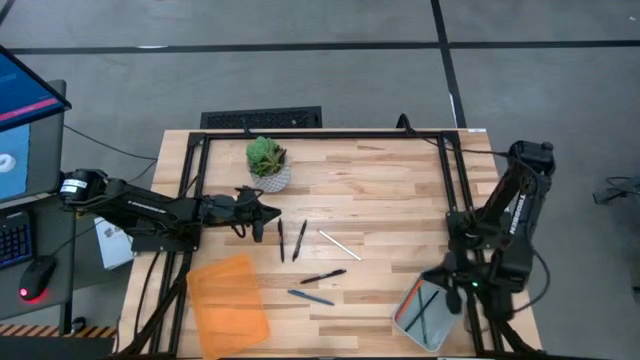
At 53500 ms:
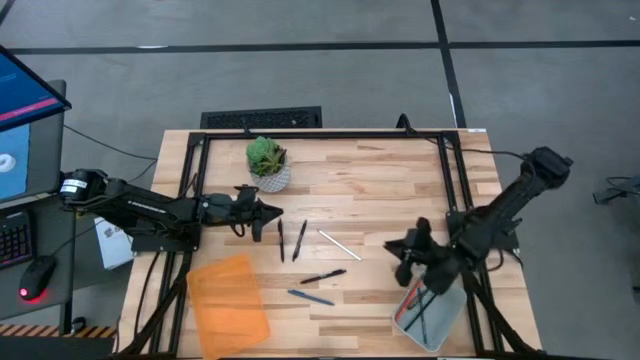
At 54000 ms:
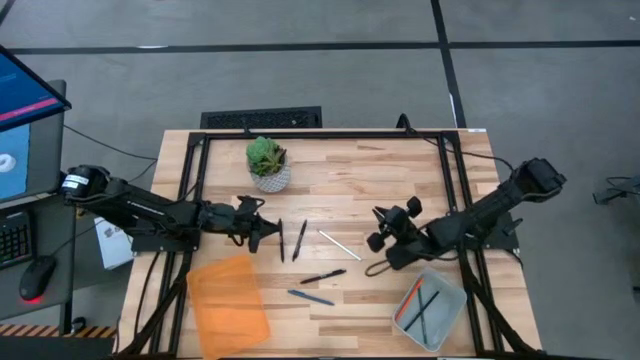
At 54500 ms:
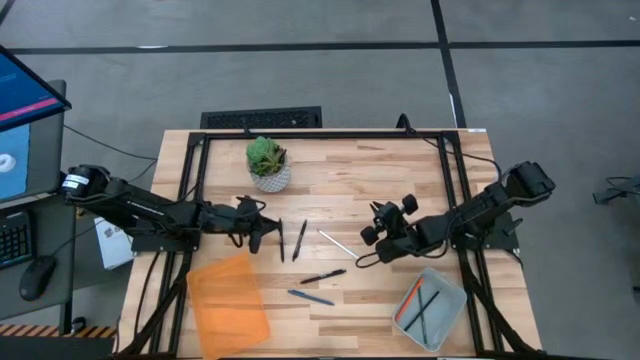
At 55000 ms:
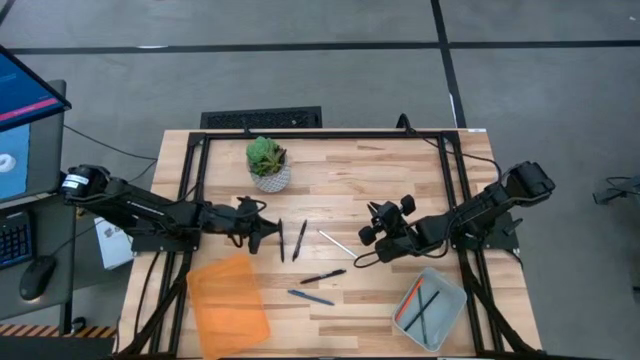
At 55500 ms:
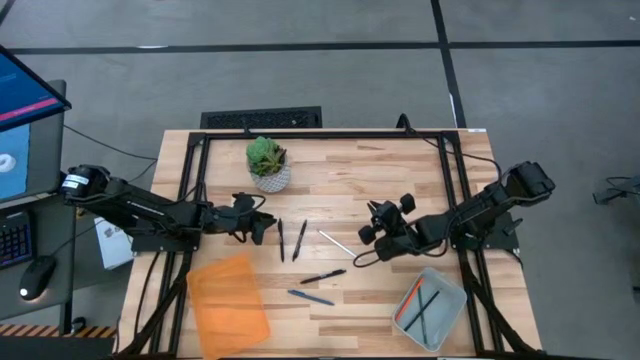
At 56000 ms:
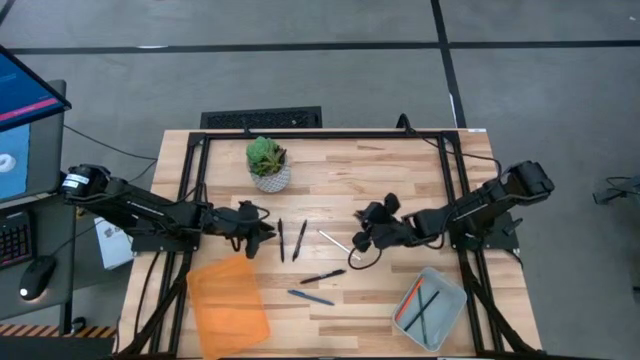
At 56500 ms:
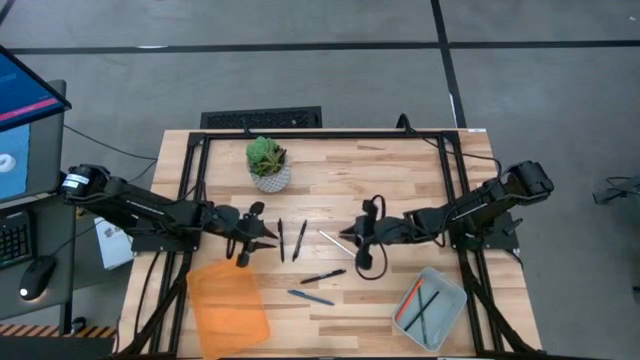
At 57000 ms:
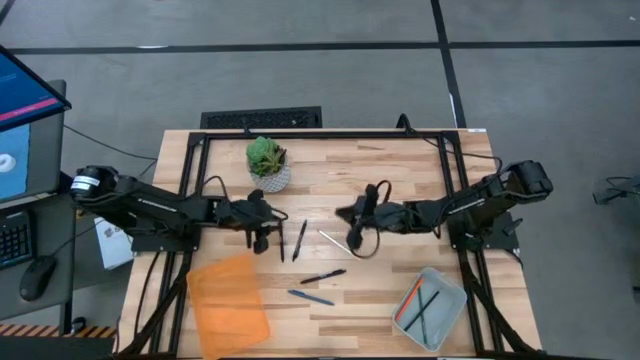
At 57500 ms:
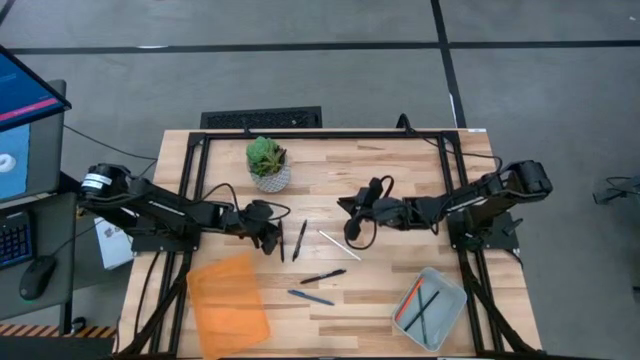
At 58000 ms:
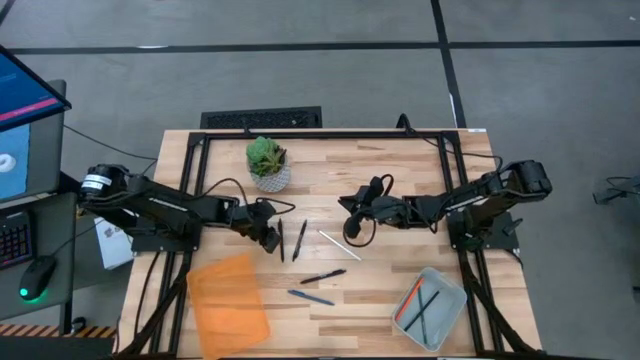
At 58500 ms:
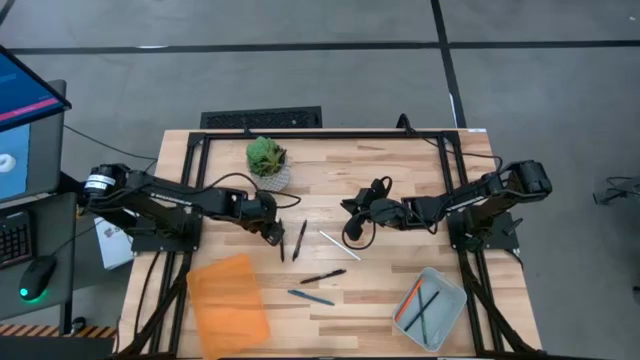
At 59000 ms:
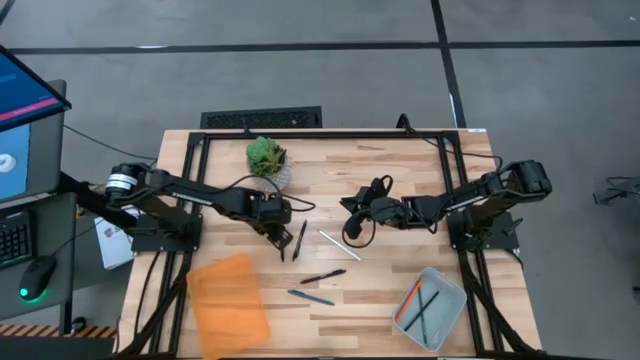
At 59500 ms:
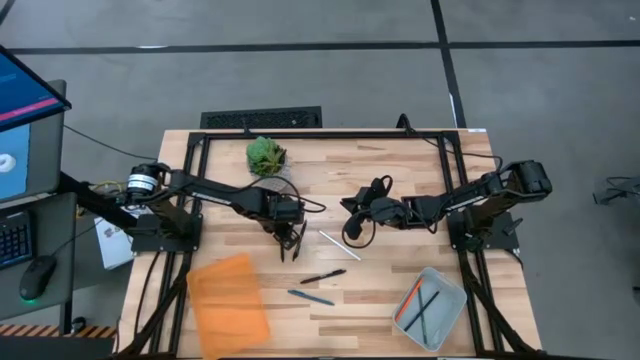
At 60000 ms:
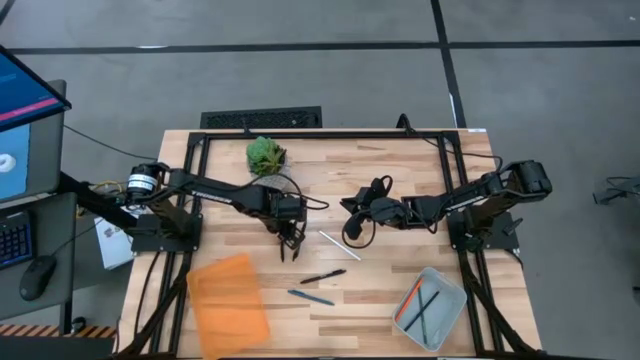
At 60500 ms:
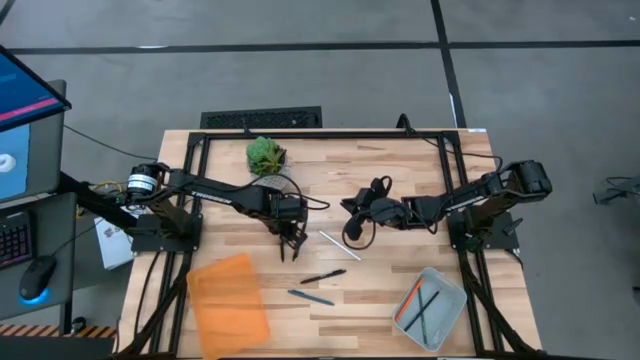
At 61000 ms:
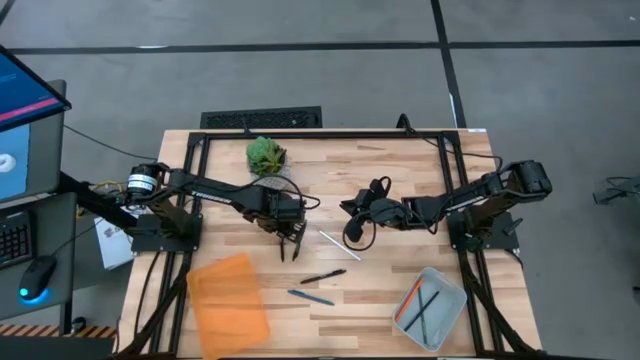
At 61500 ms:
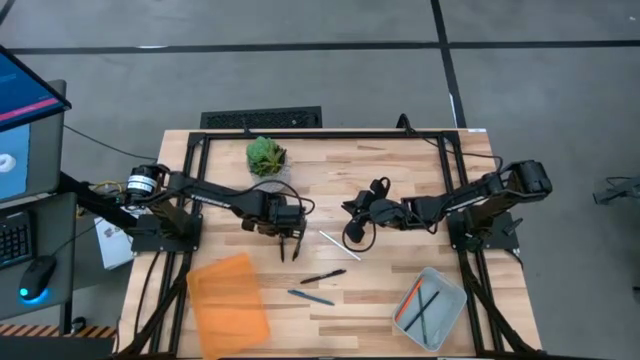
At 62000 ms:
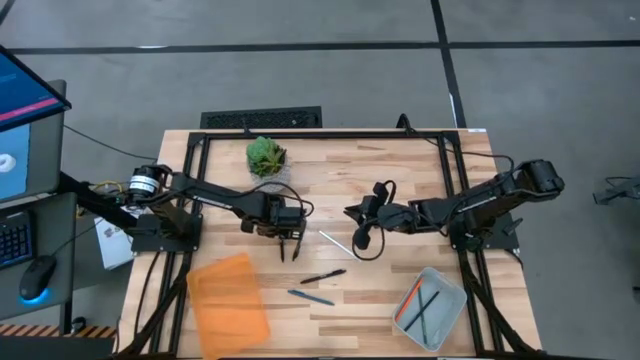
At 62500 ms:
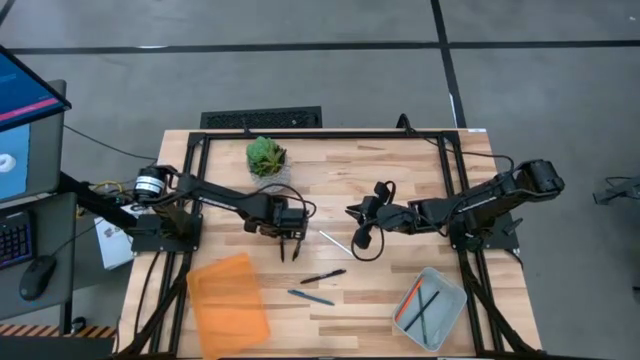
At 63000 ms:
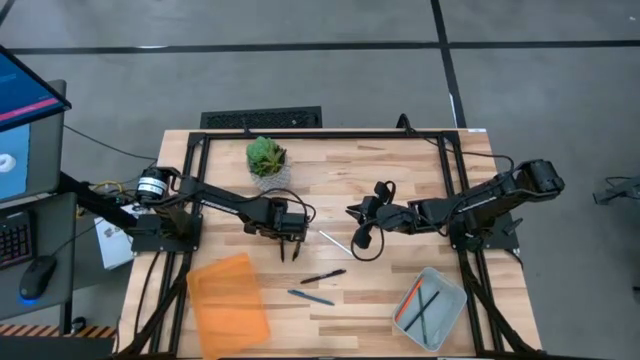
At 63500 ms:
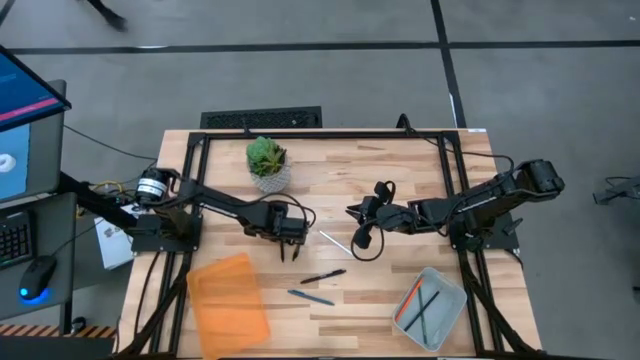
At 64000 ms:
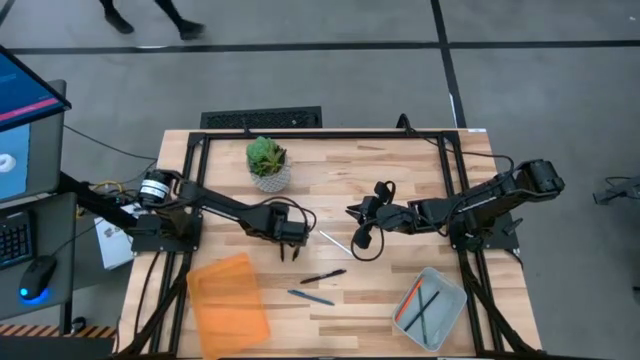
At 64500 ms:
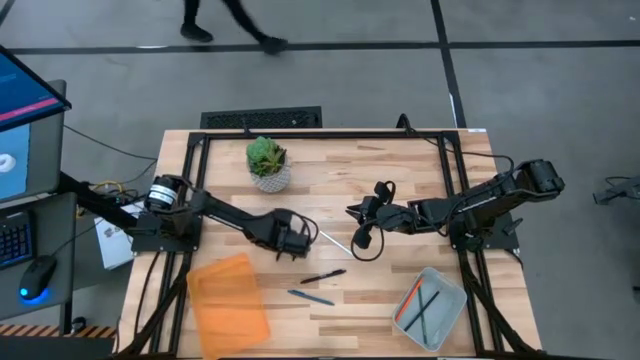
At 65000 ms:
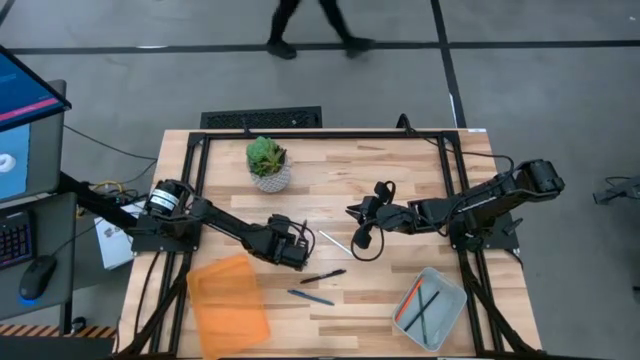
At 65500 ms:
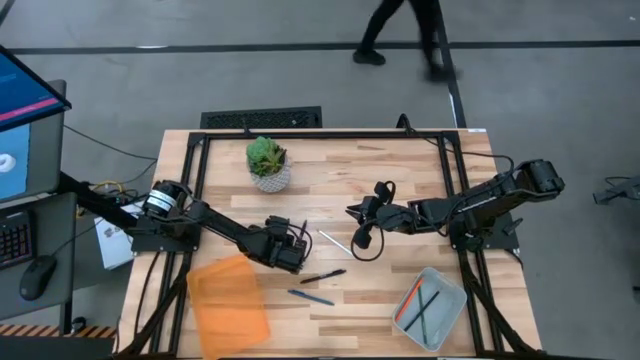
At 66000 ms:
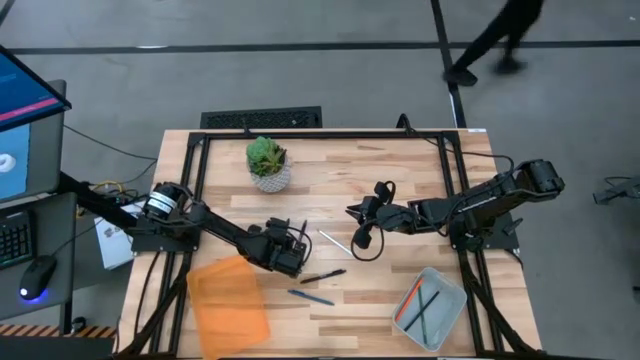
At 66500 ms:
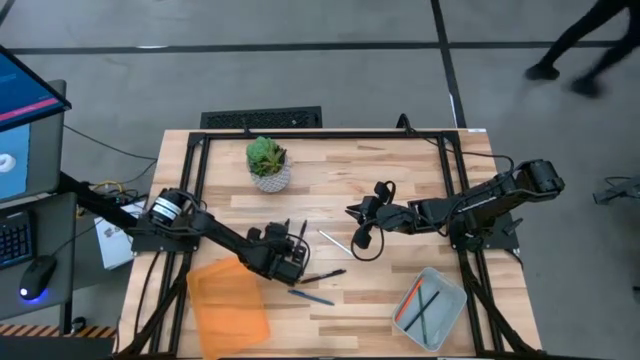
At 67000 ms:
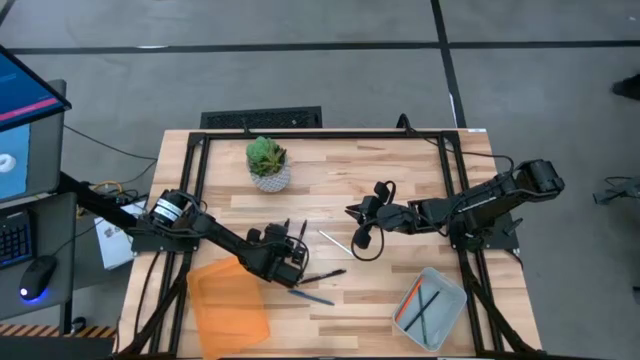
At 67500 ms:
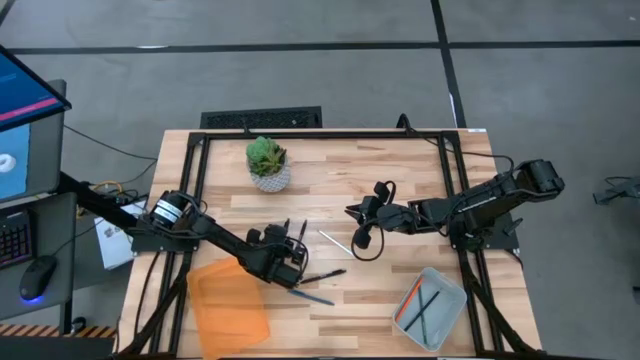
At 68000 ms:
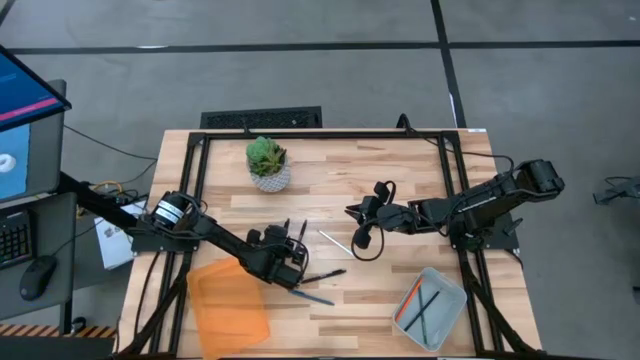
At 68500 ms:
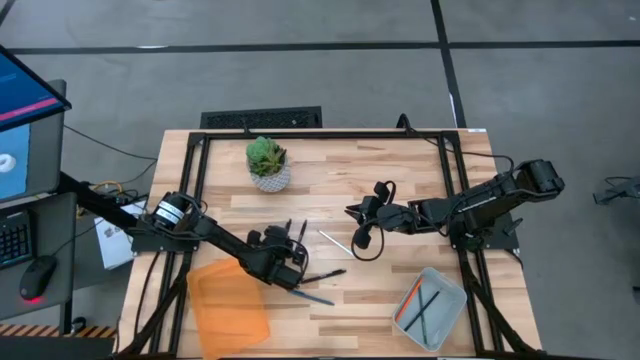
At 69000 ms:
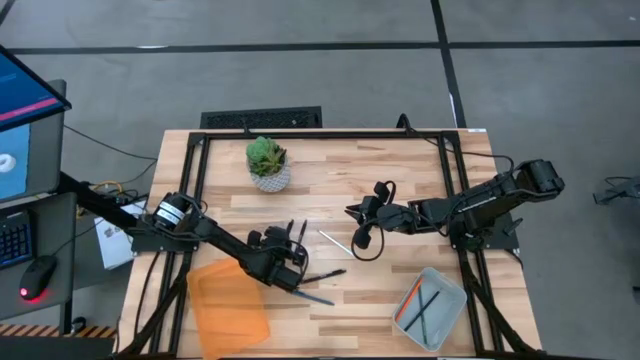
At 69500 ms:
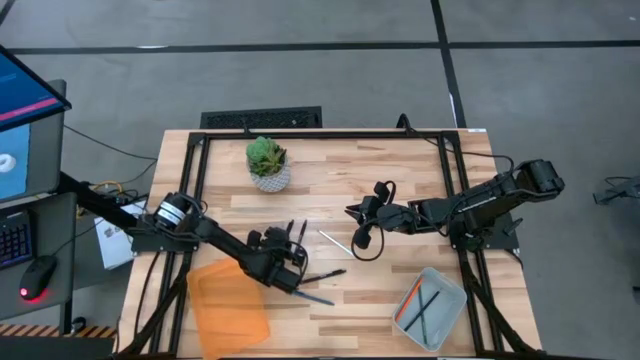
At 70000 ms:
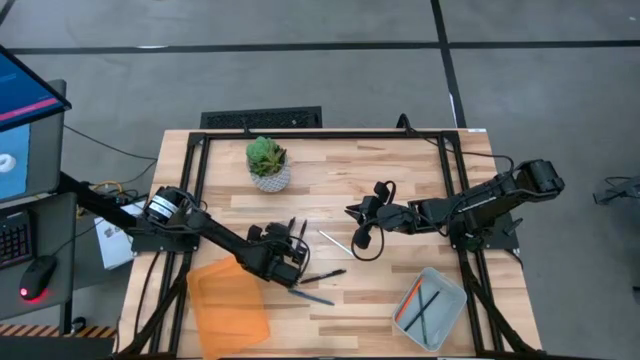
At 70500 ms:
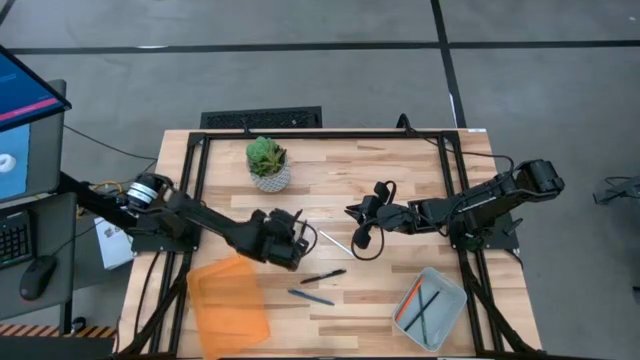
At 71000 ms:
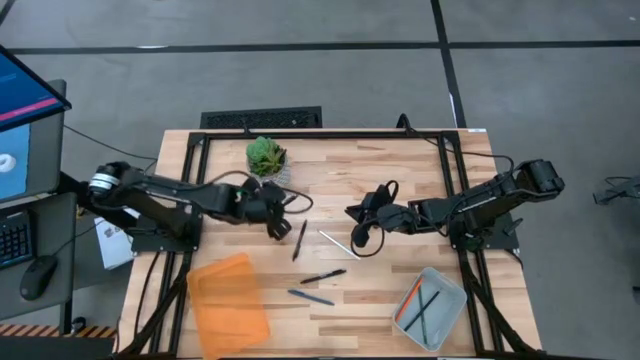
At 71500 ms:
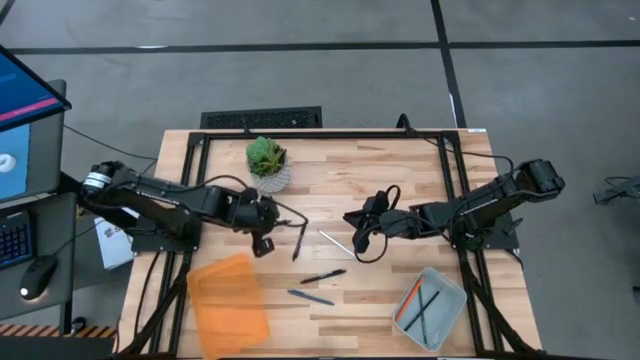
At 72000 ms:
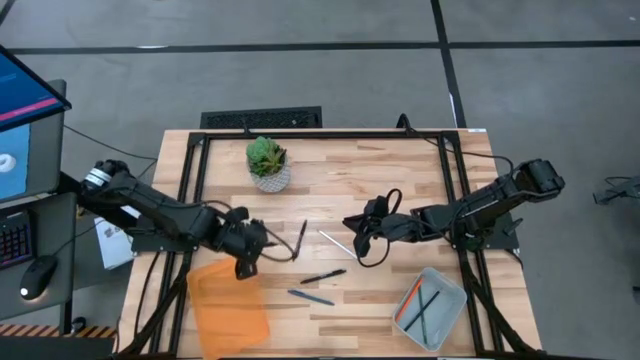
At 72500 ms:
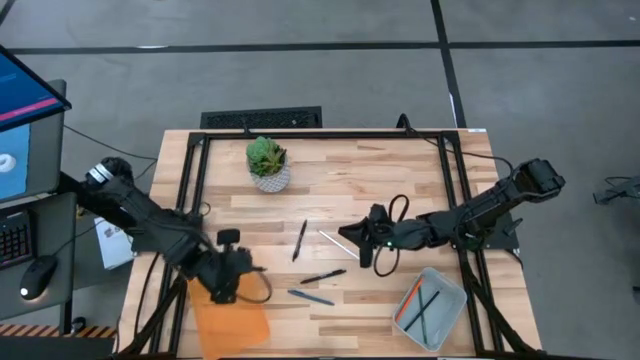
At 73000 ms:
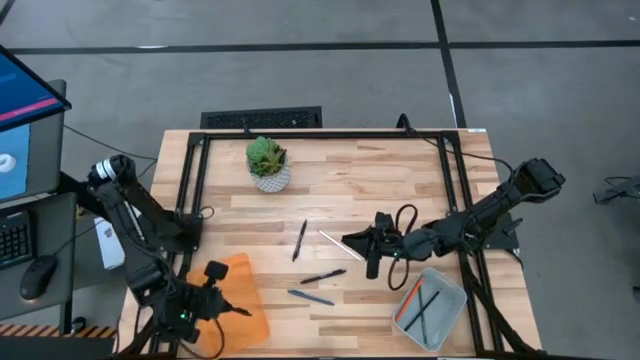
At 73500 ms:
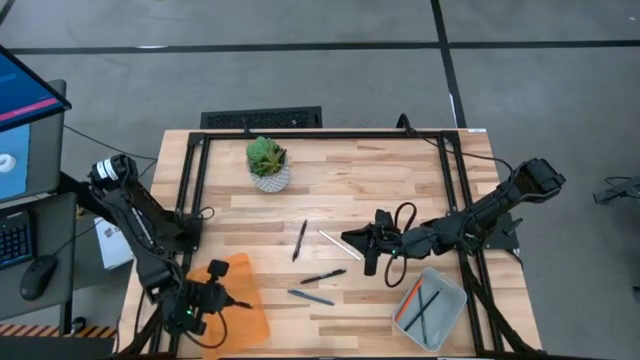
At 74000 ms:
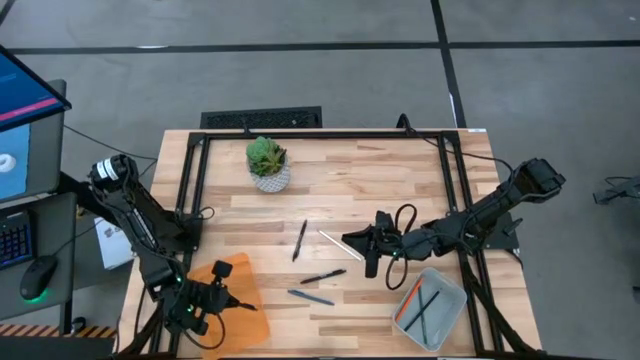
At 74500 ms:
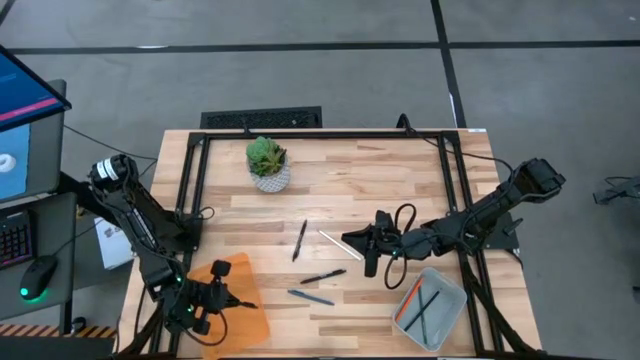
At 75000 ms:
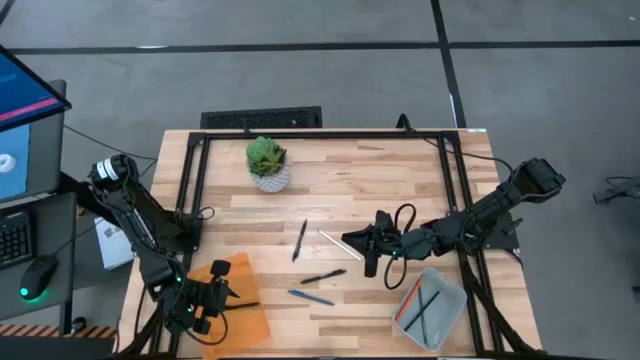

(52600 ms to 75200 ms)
Task: Sort pens & pencils
Put the black pen into the orange bin
